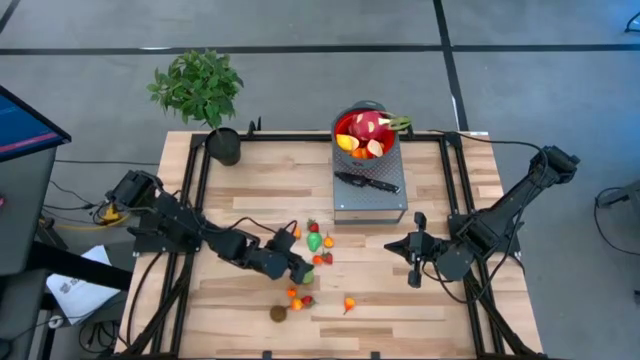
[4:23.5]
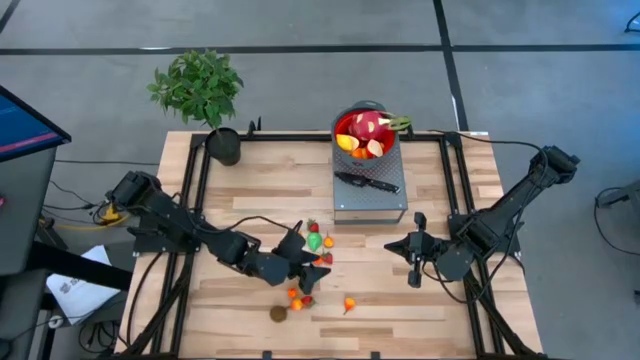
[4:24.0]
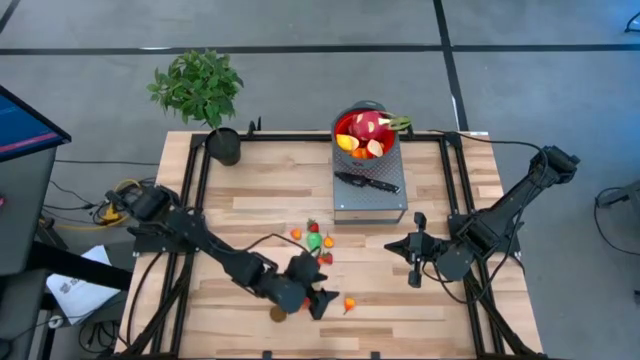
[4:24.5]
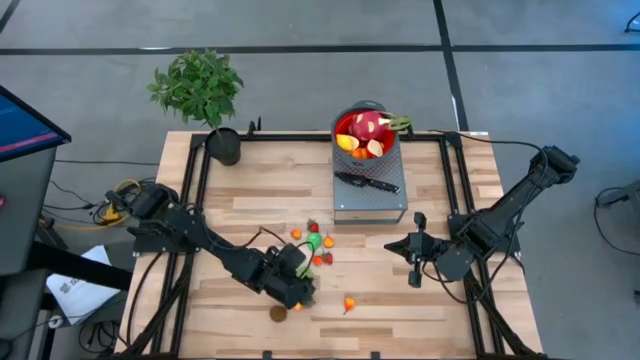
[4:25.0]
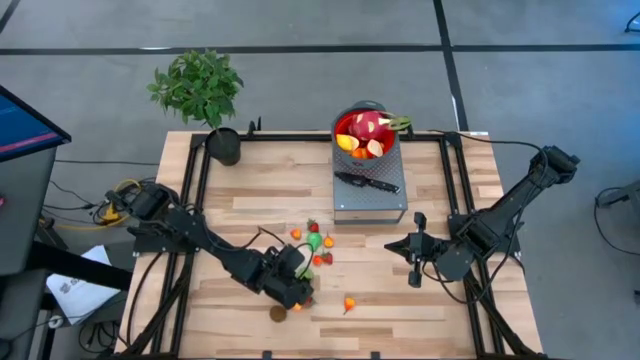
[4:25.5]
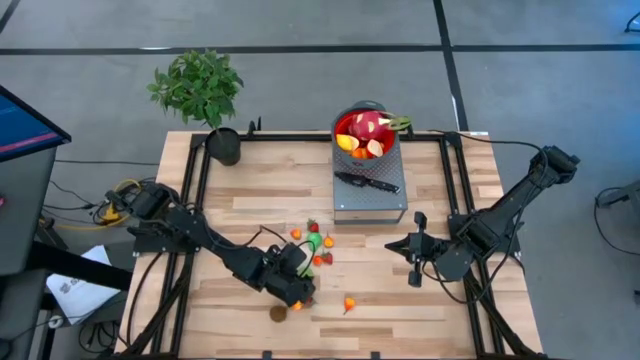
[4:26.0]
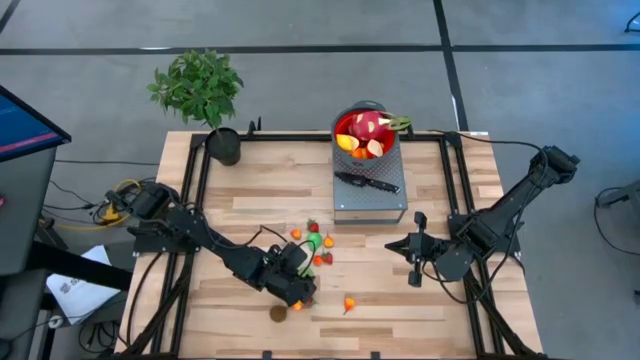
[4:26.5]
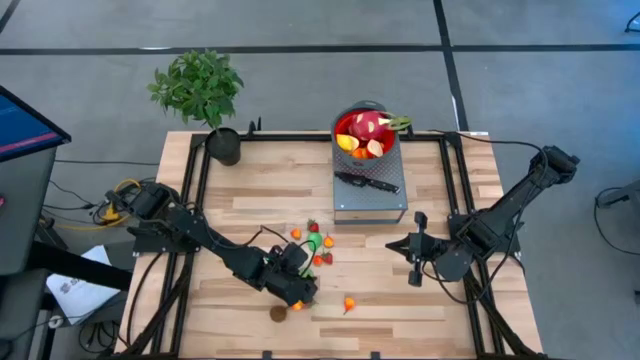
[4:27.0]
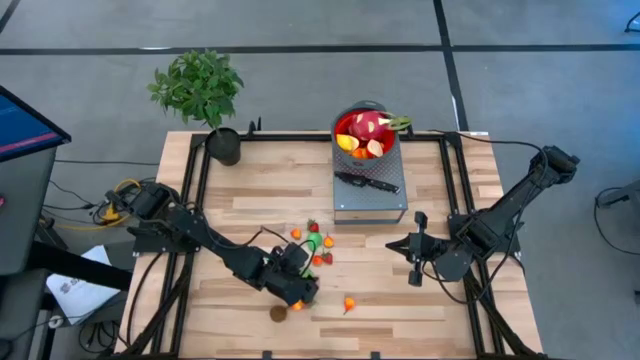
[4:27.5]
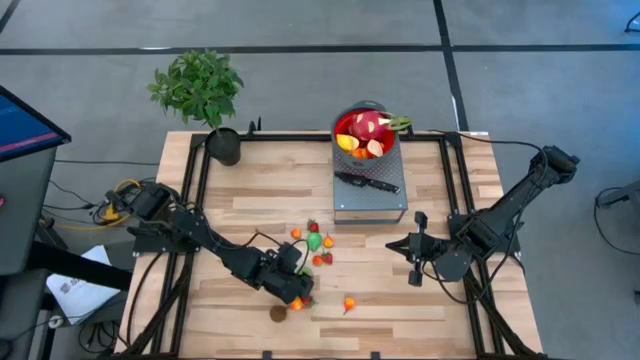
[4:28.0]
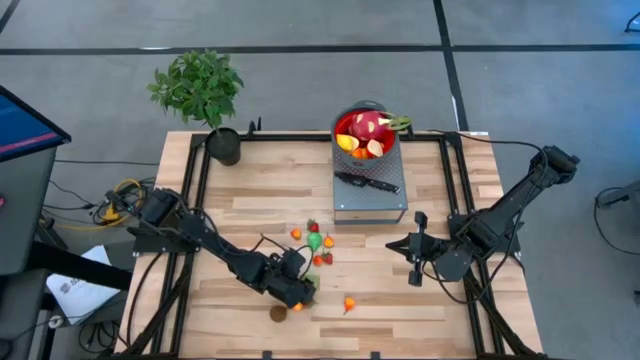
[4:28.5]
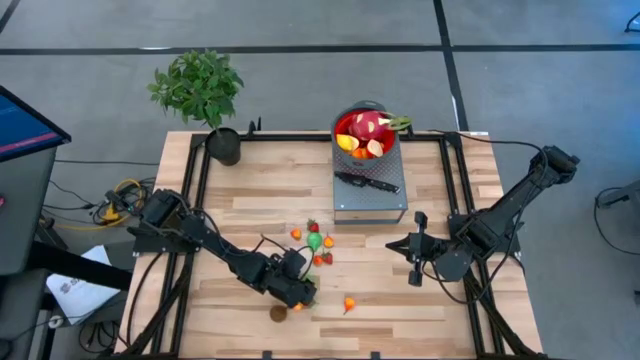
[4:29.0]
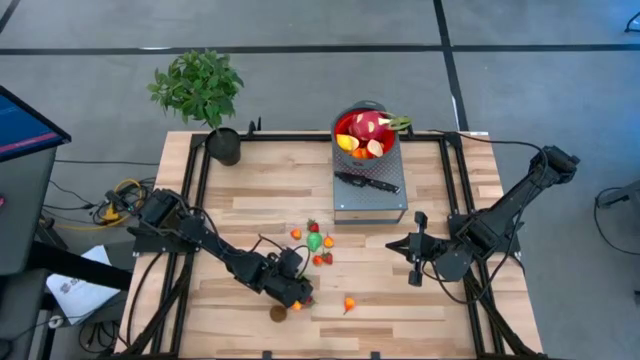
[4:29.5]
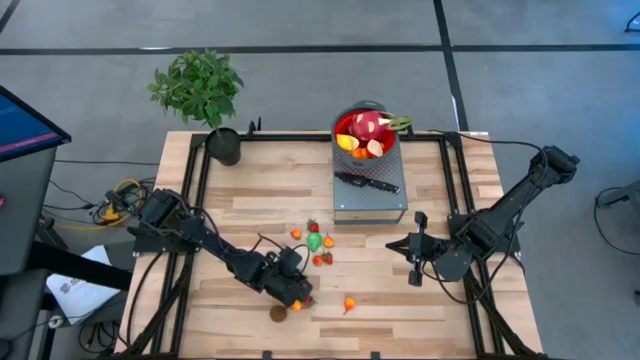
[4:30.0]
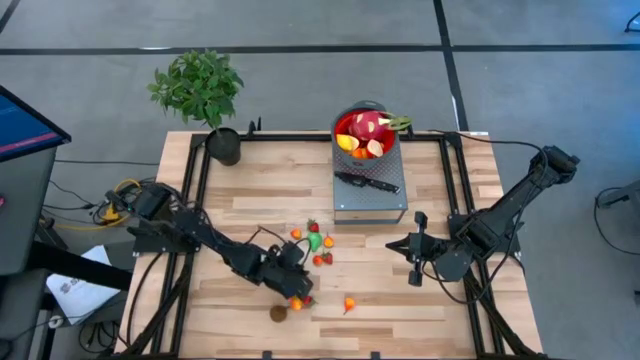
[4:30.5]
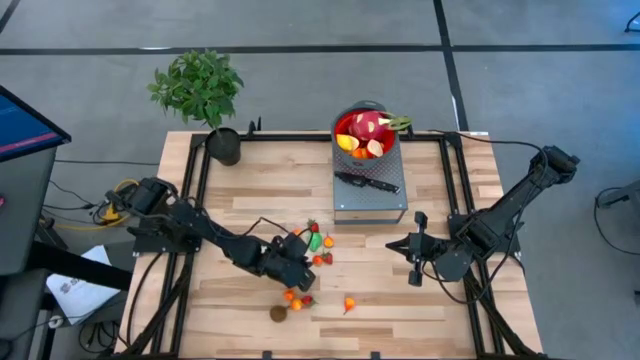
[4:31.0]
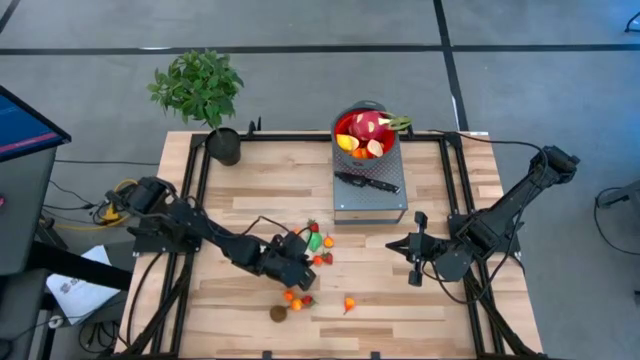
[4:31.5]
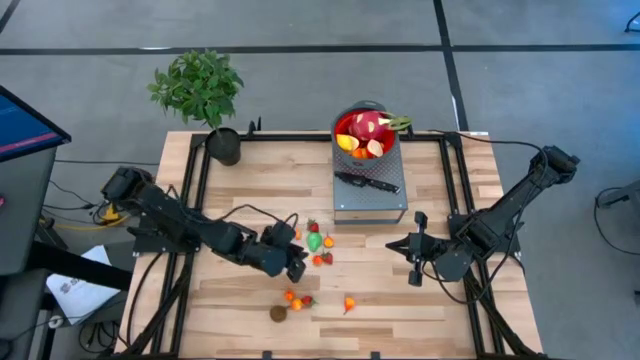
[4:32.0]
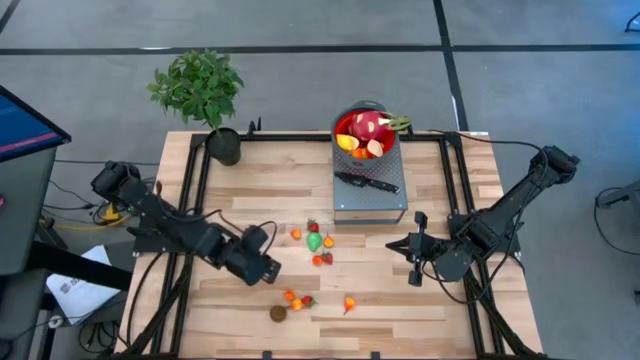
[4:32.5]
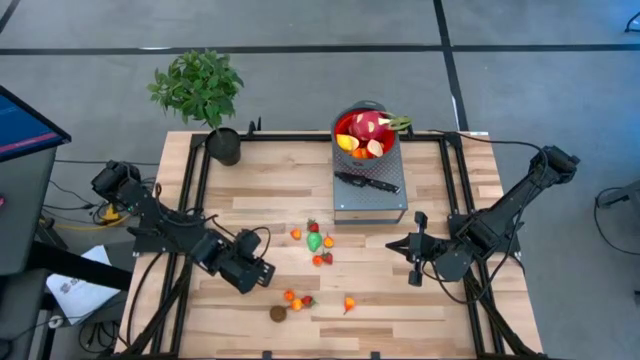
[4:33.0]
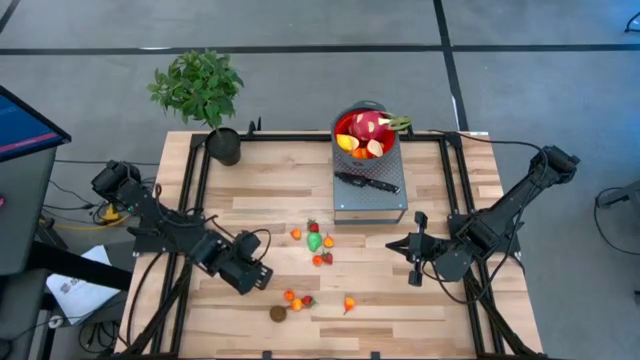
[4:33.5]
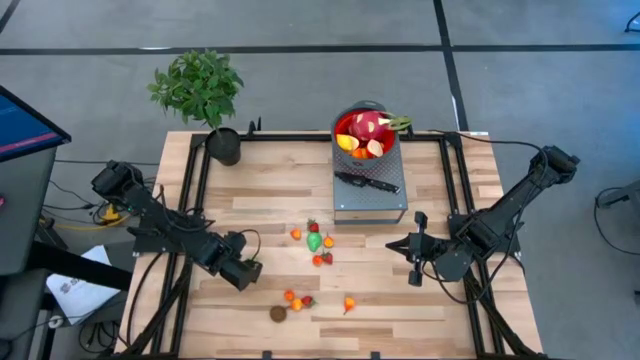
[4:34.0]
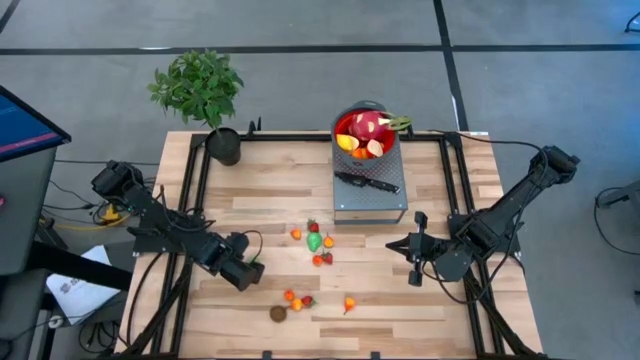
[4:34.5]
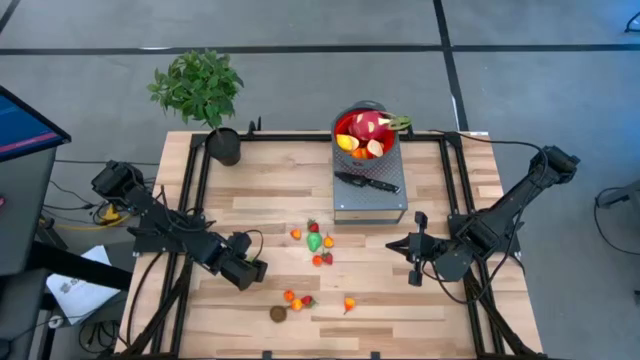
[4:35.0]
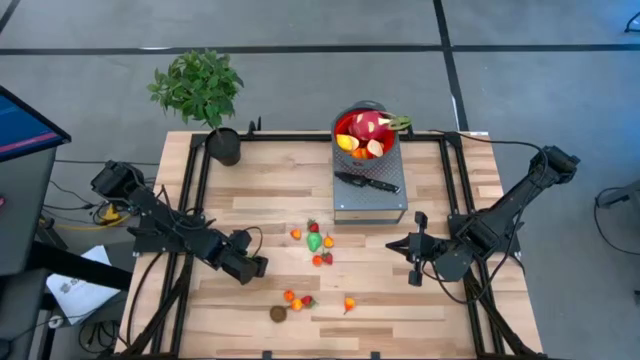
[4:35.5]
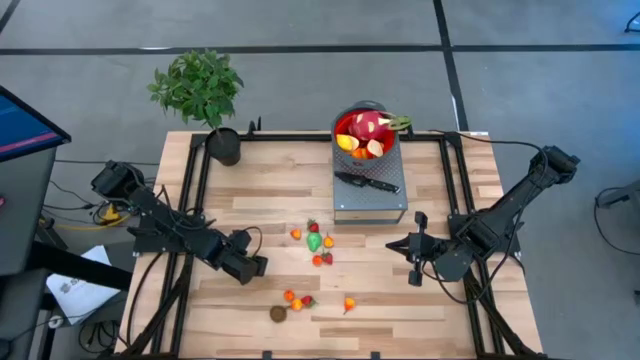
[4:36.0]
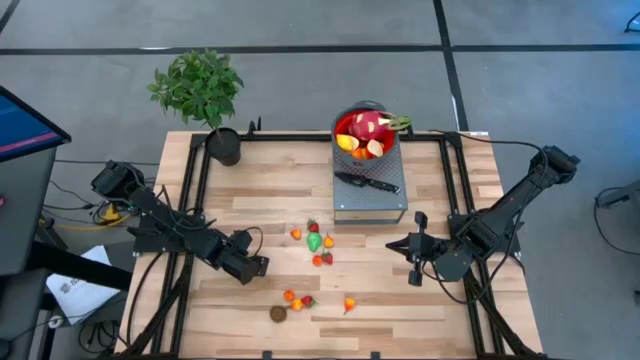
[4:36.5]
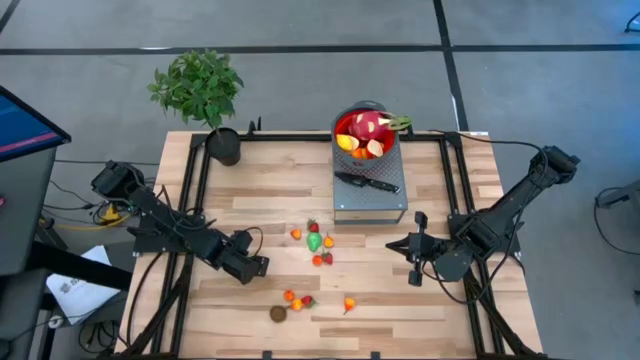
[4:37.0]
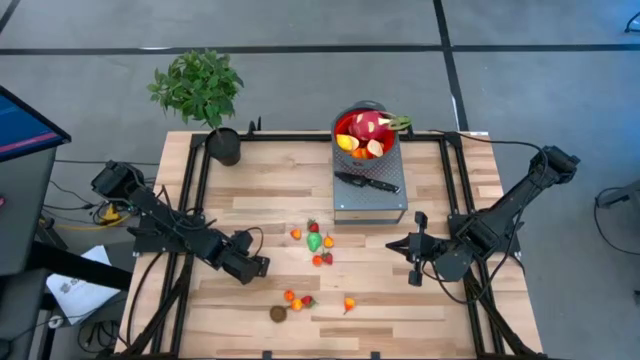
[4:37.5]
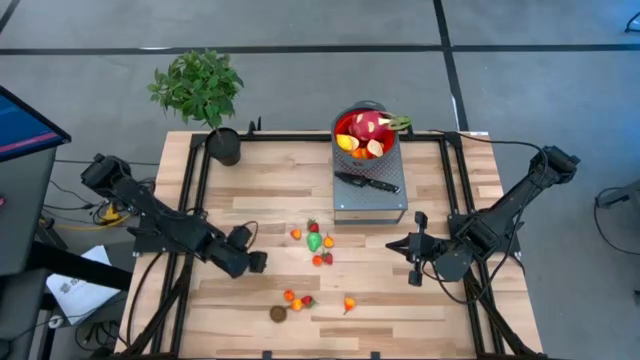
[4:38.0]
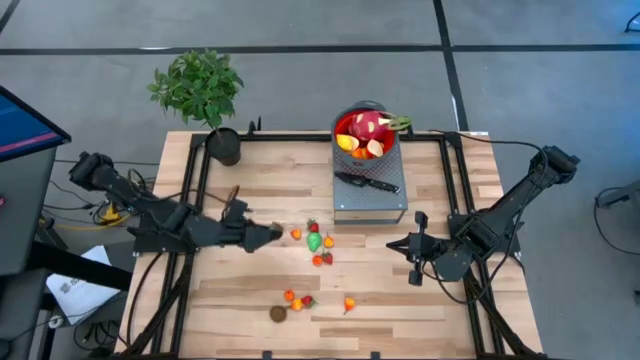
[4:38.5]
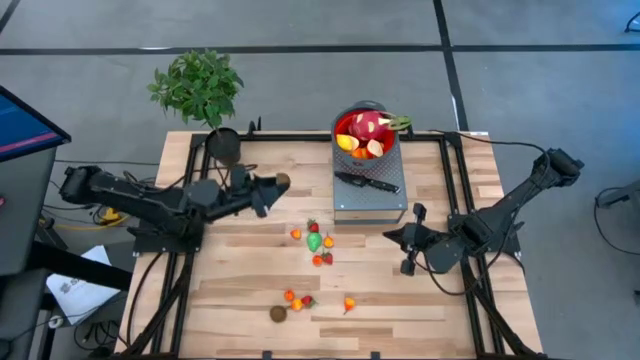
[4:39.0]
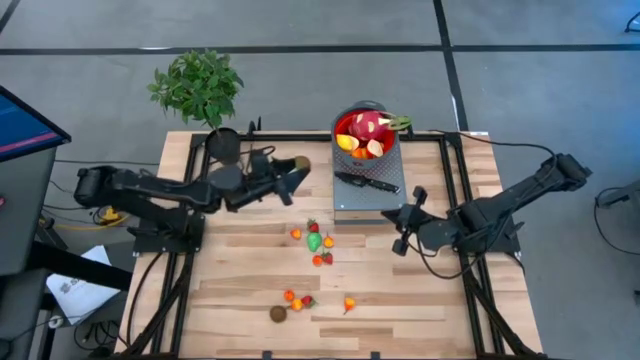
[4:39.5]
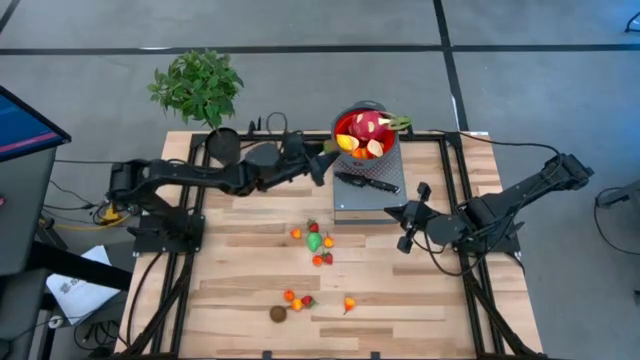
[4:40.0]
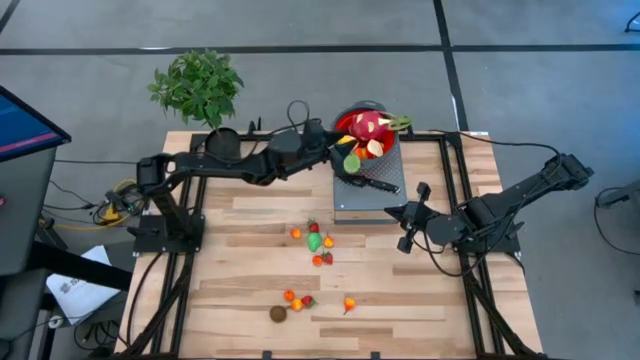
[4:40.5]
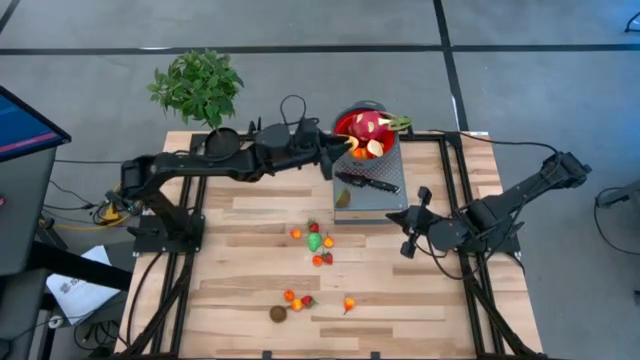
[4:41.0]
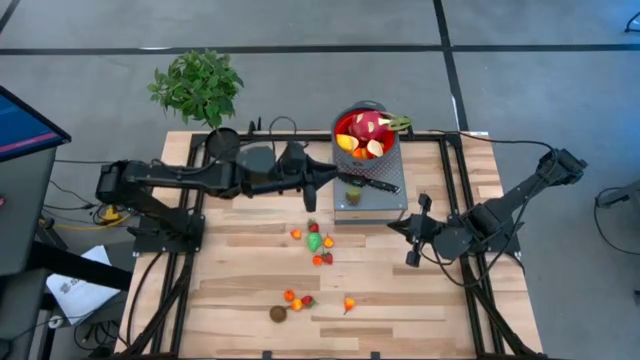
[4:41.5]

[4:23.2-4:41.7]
Task: Pick & Place Fruit
Put the half kiwi into the red colander on the shelf

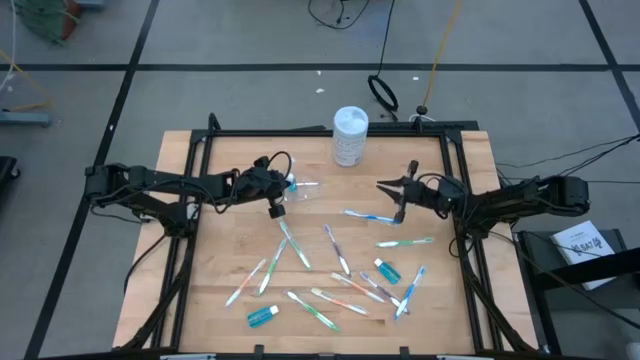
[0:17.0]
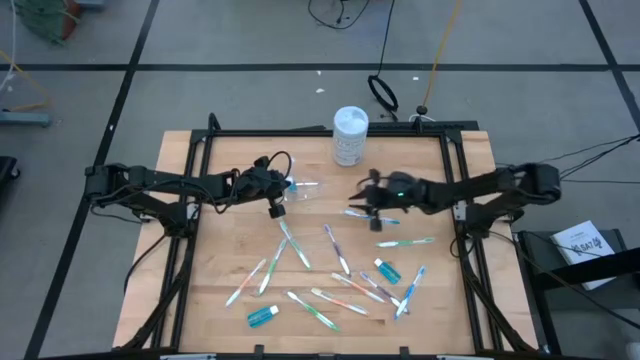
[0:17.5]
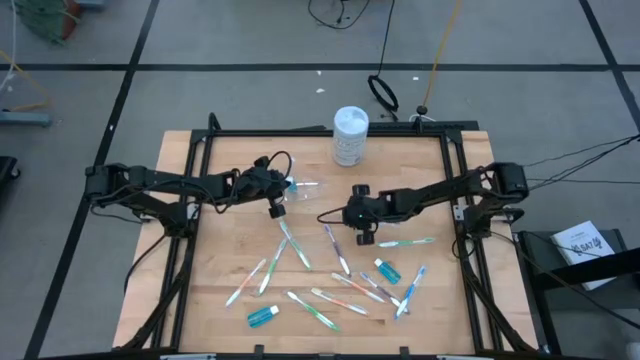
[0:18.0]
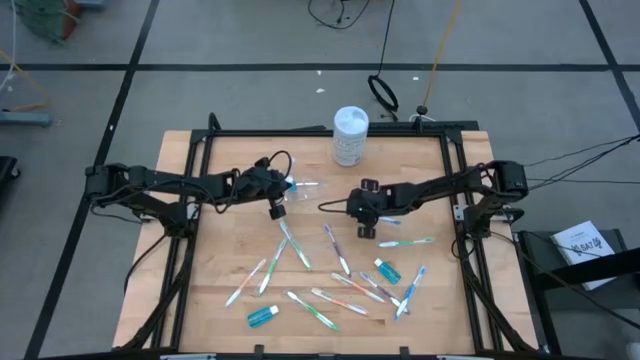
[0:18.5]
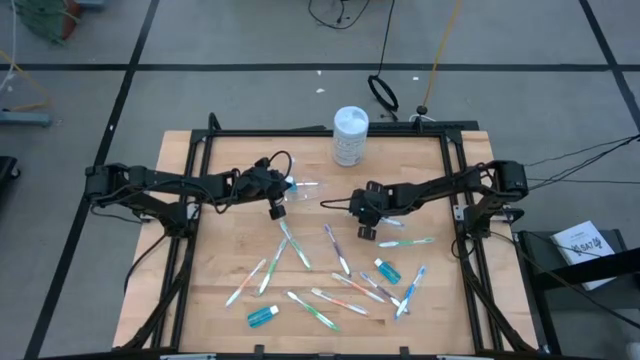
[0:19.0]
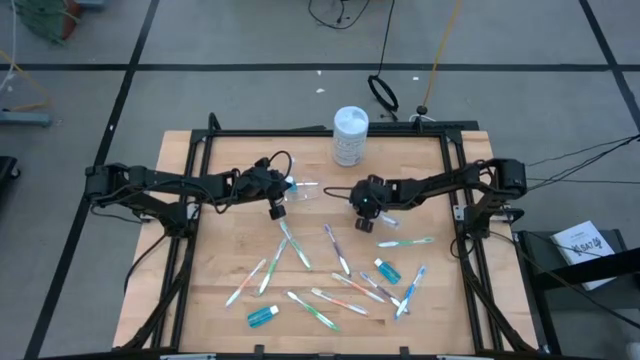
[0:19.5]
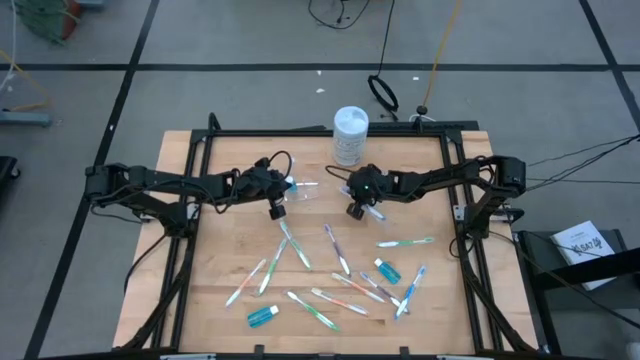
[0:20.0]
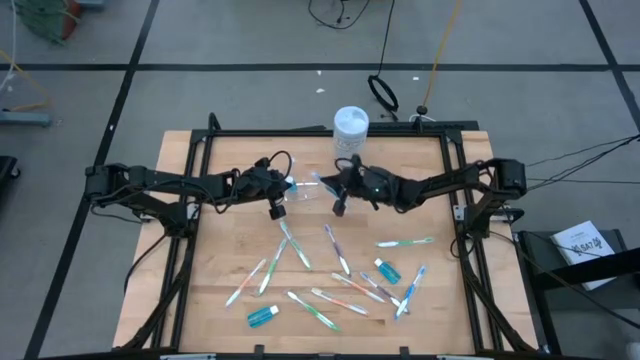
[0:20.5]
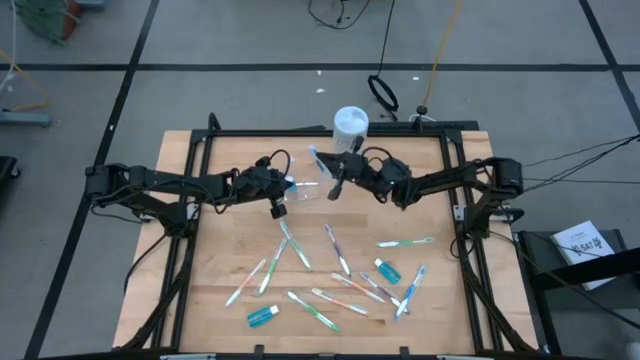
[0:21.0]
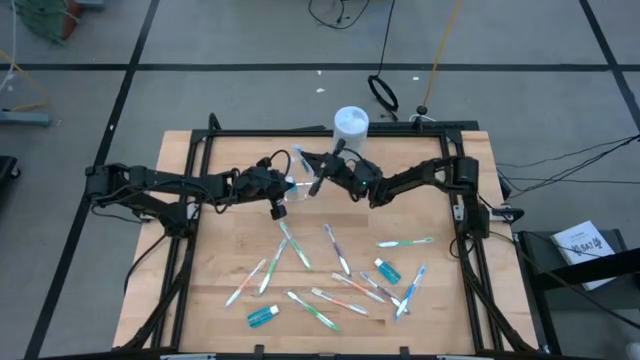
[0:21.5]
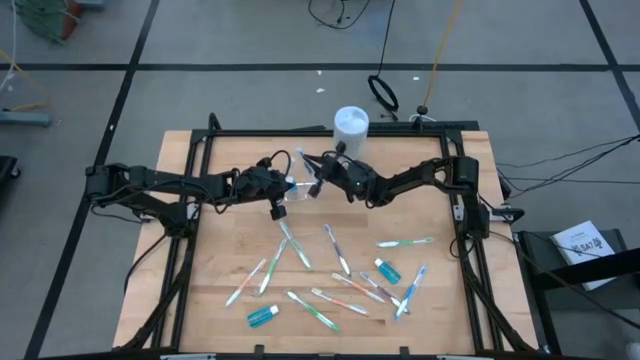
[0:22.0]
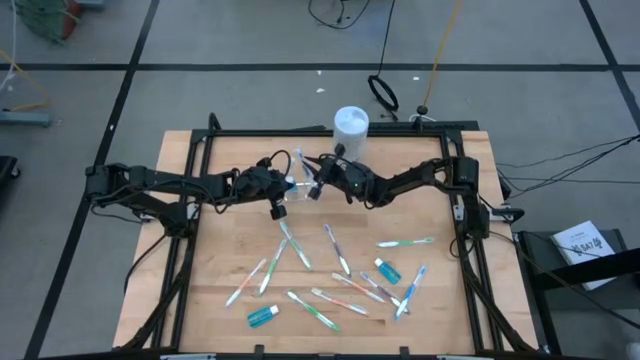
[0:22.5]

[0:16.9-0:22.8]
Task: Pick & Place toothbrushing station
Put the blue toothbrush into the transparent organizer
